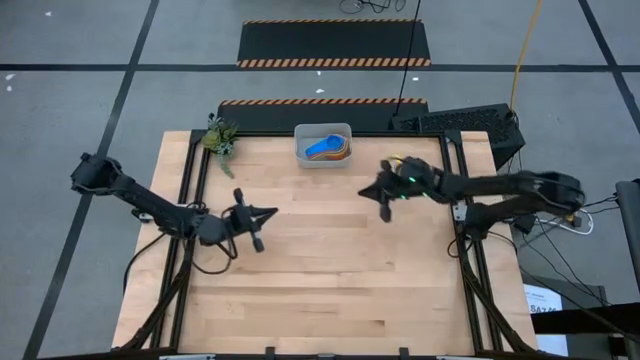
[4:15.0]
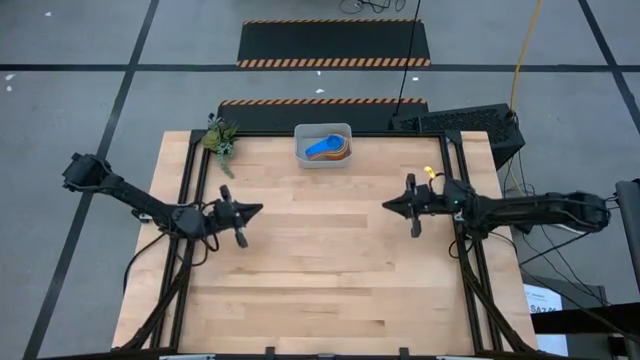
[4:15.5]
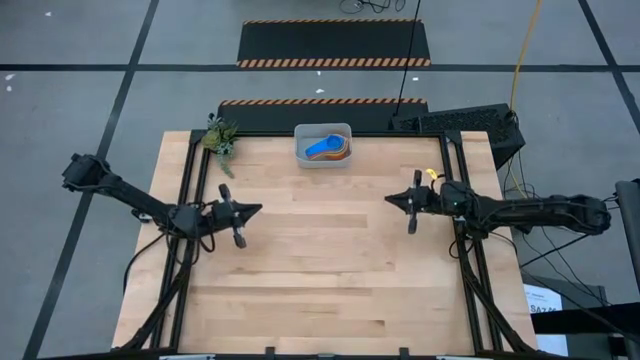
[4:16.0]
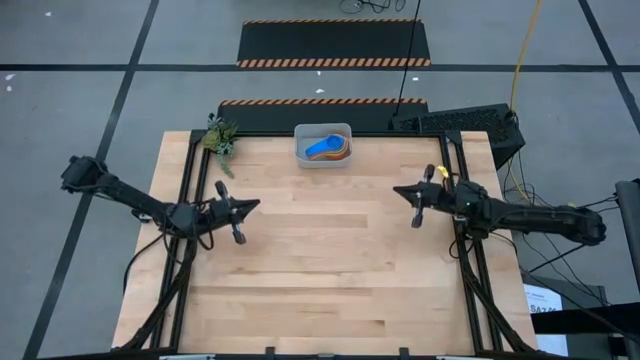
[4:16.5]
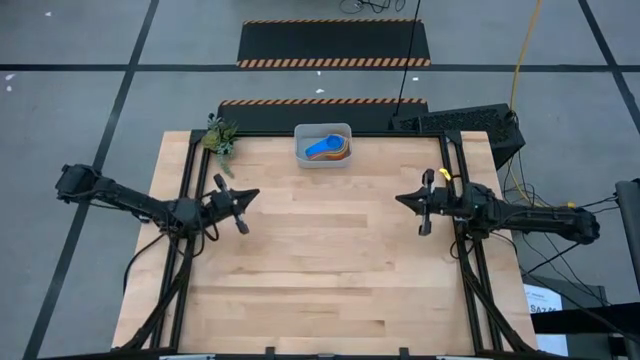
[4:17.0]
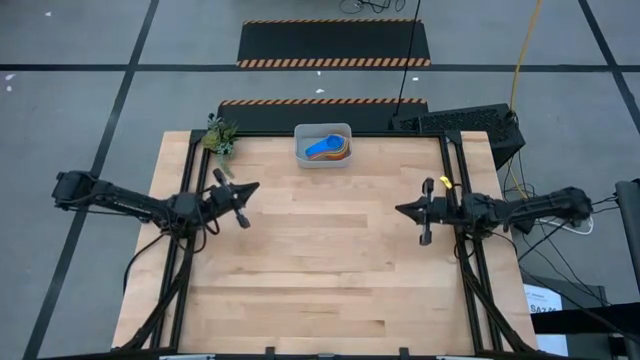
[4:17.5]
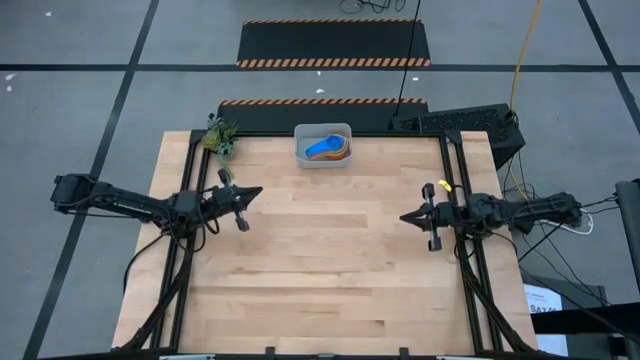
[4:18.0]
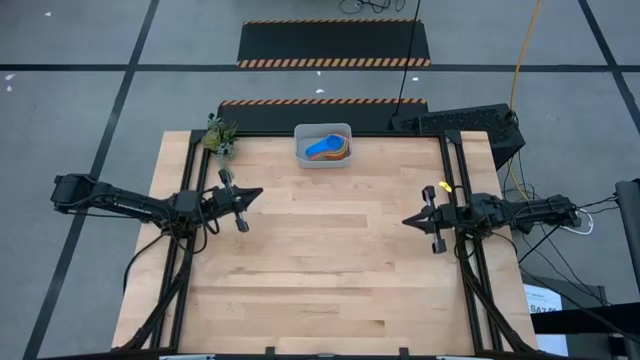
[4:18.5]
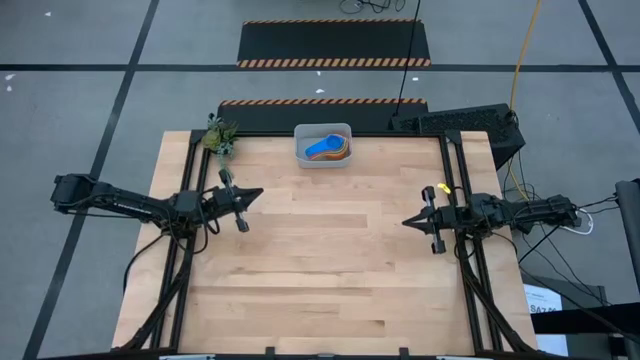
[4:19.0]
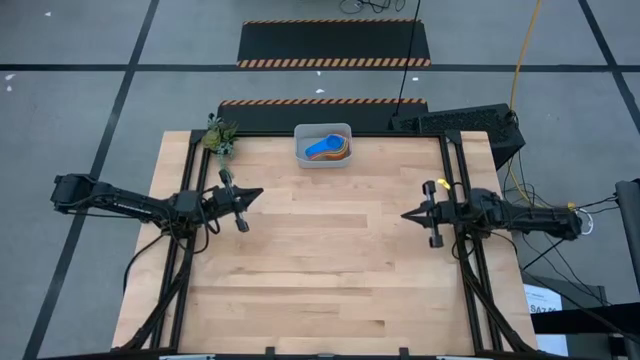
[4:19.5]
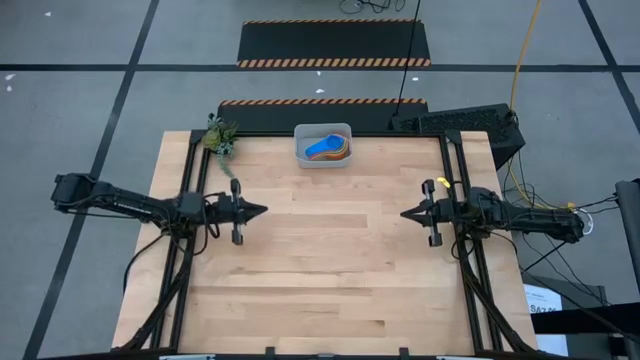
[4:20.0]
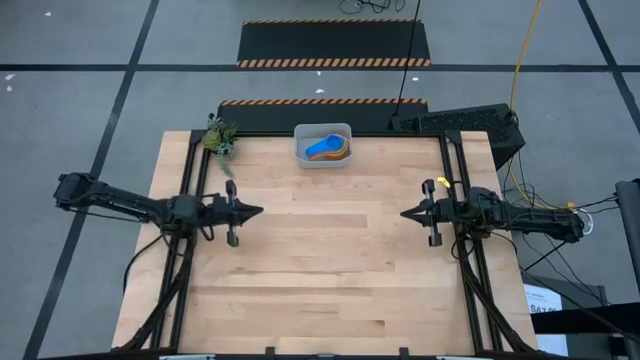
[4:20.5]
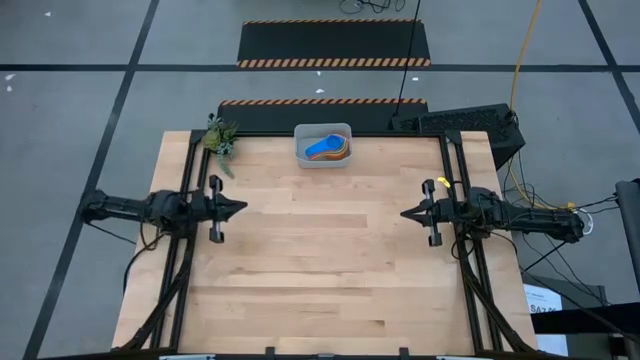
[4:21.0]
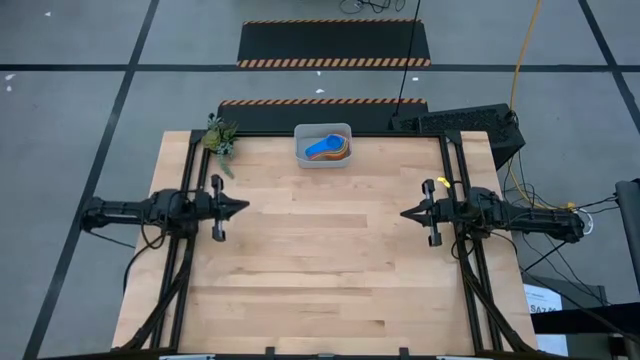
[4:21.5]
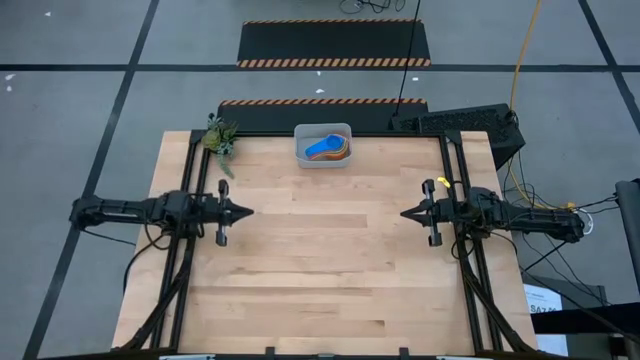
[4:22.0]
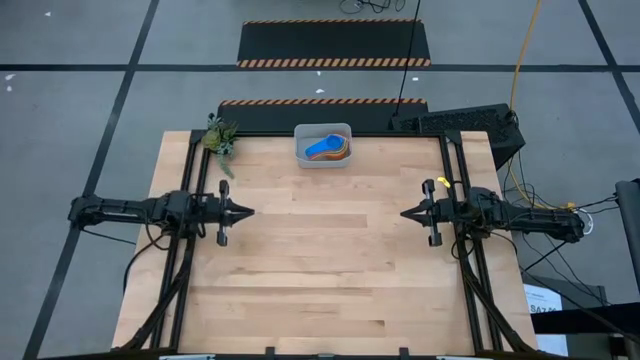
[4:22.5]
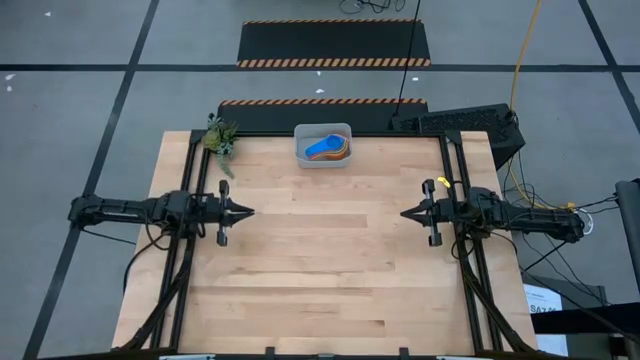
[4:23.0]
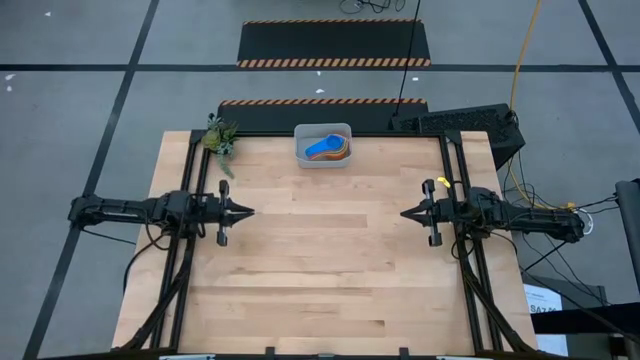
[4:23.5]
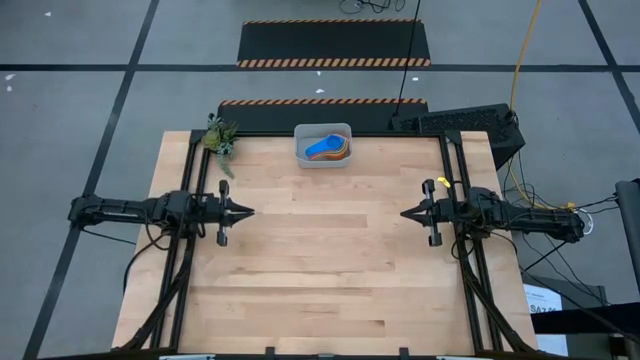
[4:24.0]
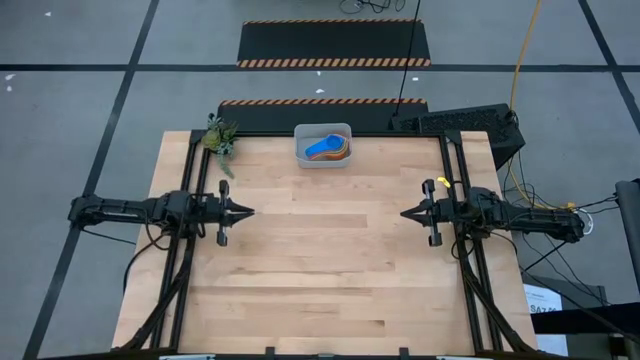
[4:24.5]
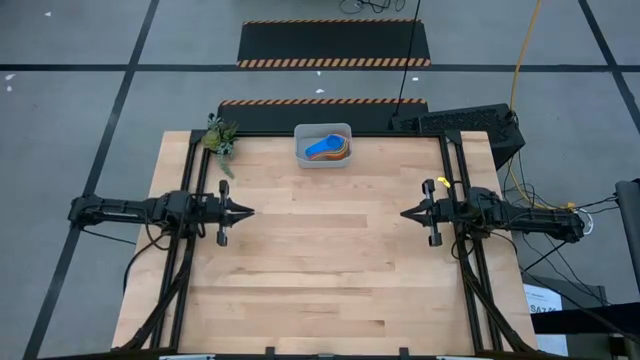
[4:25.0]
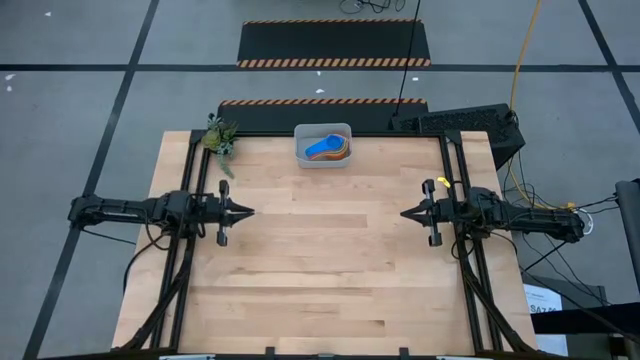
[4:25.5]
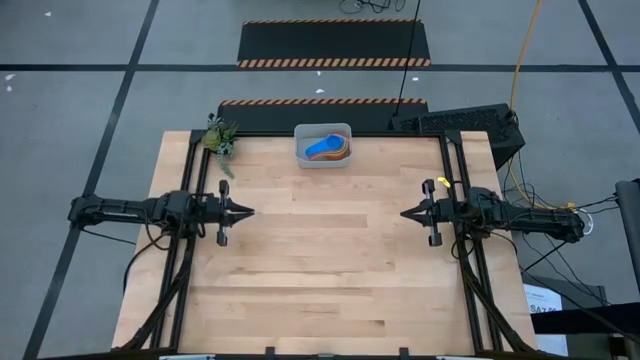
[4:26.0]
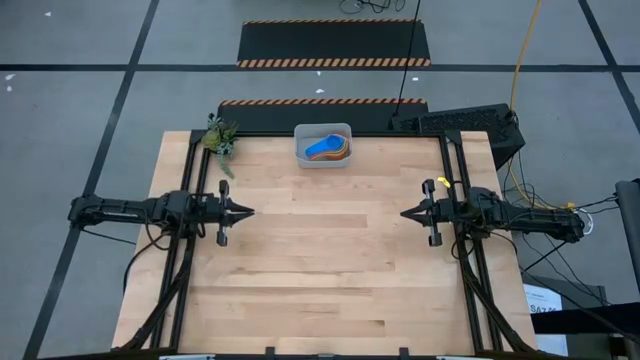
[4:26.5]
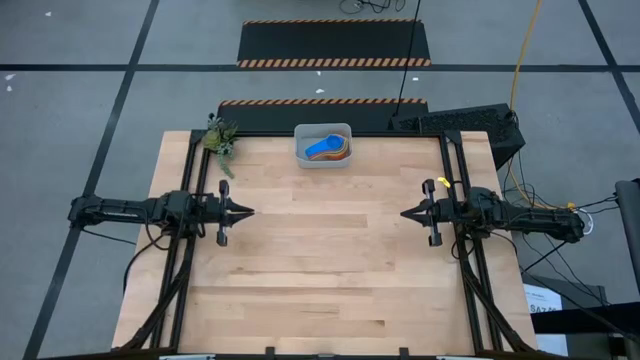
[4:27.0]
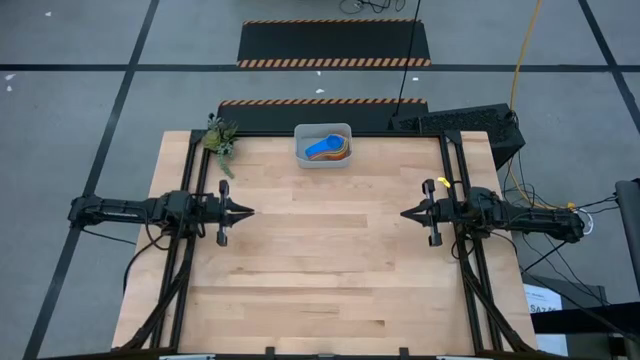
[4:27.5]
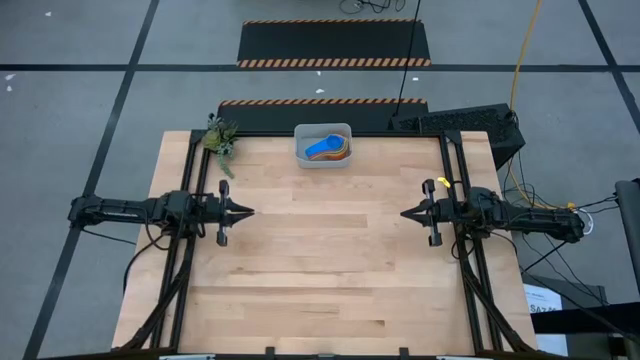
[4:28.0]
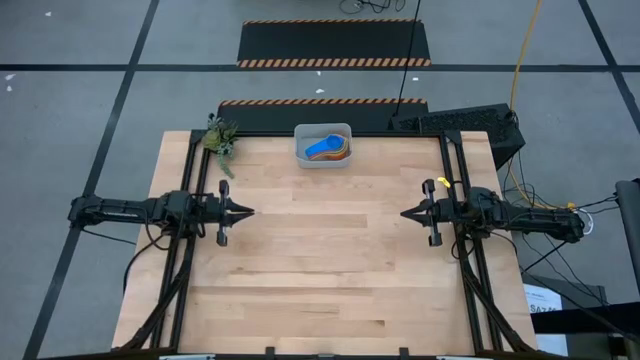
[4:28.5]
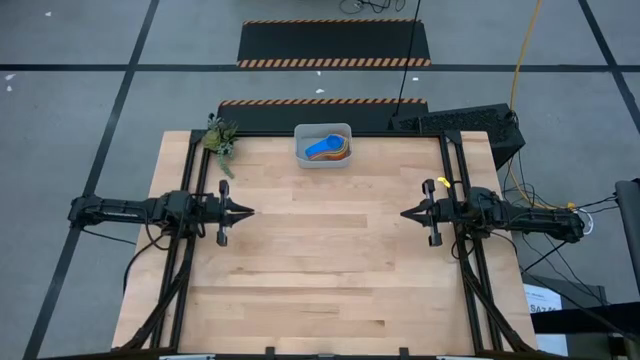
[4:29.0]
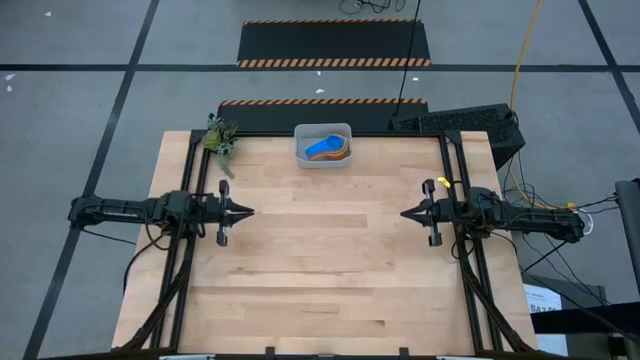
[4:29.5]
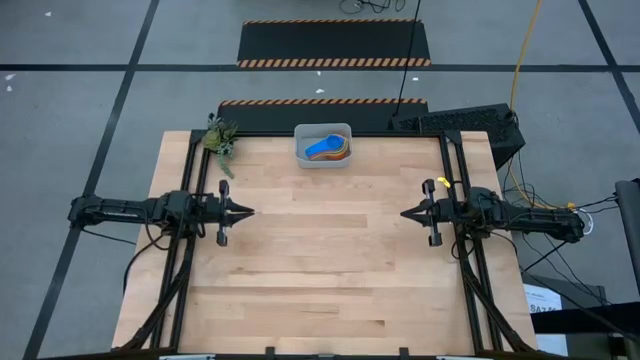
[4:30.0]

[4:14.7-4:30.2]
Task: Nest measuring cups in basket
Return to Home Position

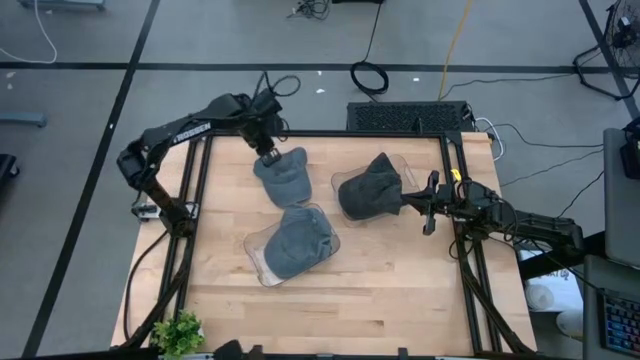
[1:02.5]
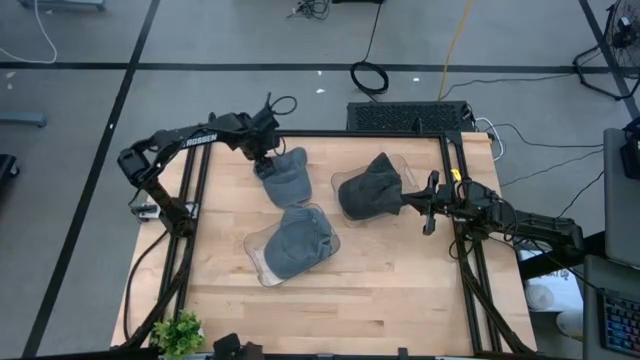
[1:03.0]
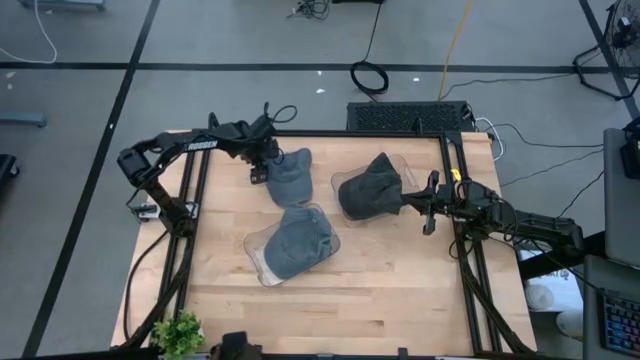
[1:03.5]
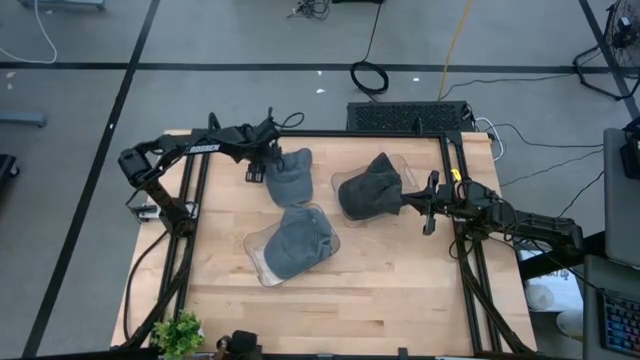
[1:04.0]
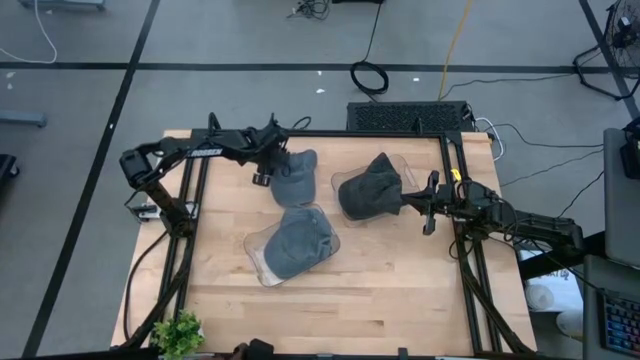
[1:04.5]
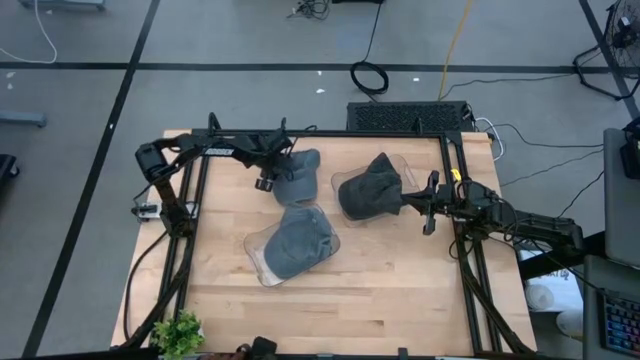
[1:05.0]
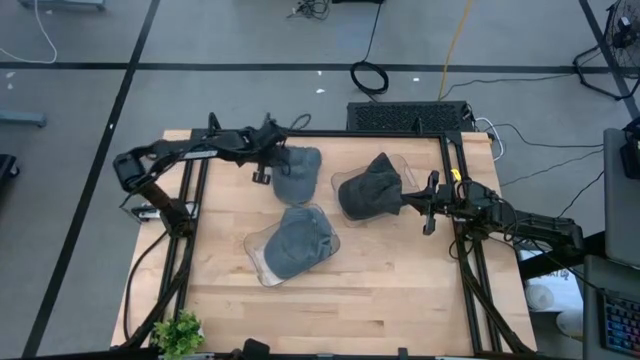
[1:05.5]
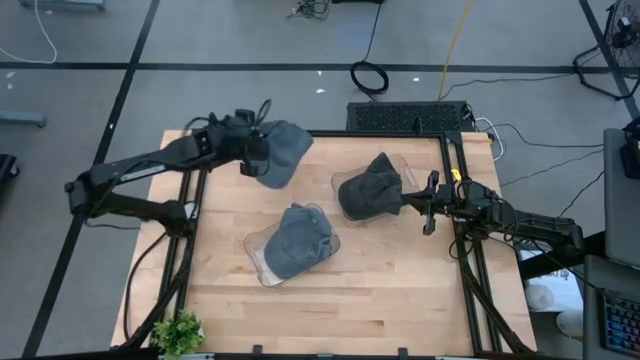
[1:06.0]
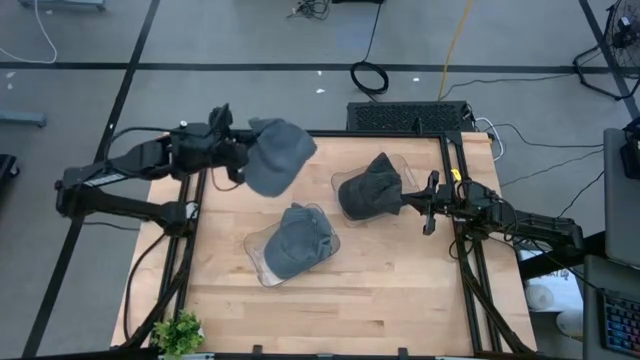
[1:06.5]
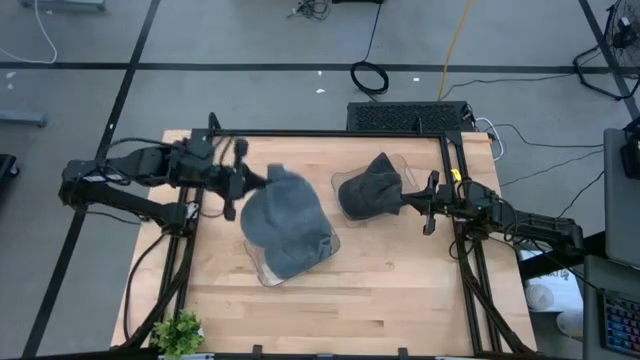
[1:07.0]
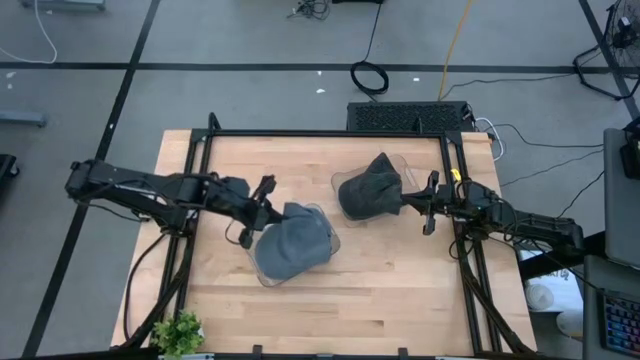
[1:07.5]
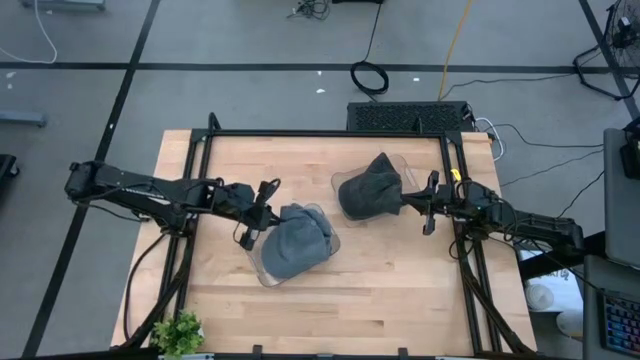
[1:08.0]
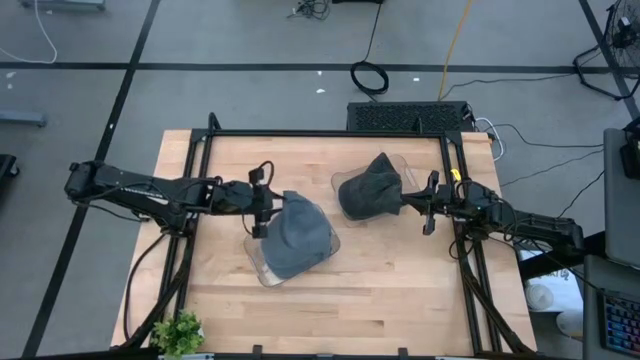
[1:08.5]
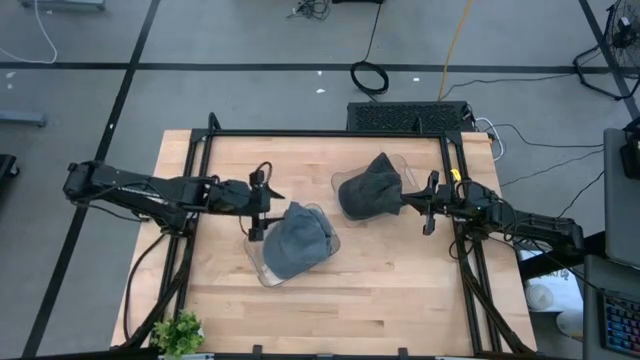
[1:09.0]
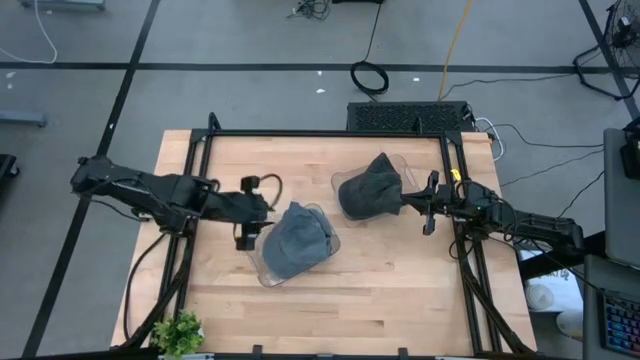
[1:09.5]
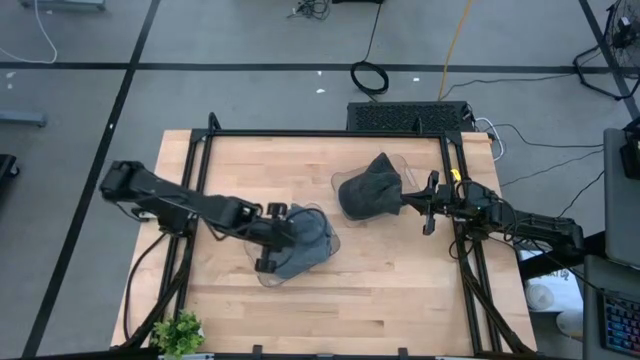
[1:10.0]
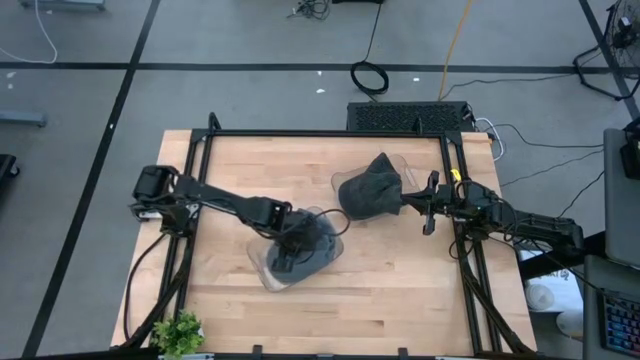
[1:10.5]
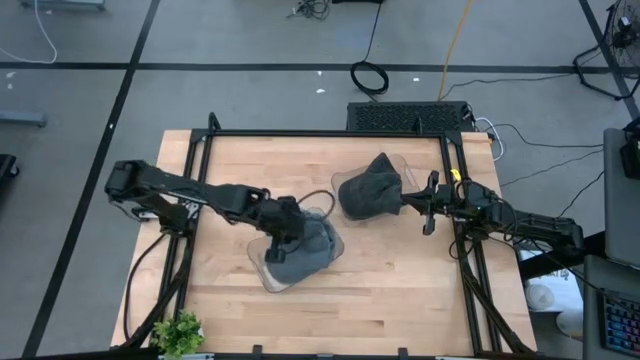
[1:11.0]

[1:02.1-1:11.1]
Task: Pick & Place hat
Put the blue cap into the bottom transparent bin
